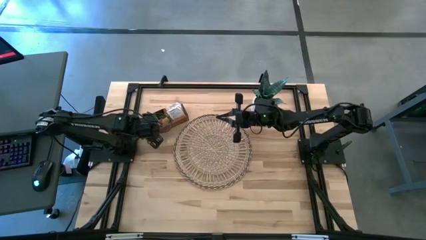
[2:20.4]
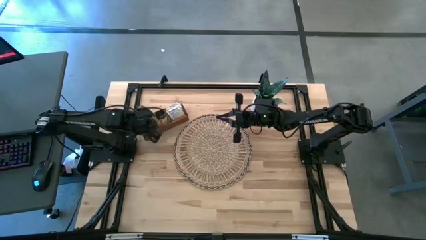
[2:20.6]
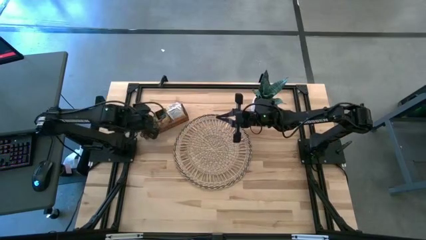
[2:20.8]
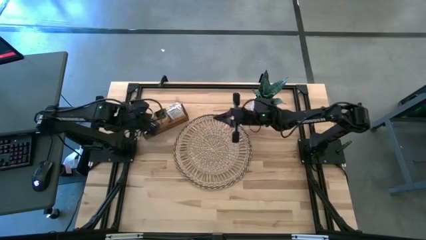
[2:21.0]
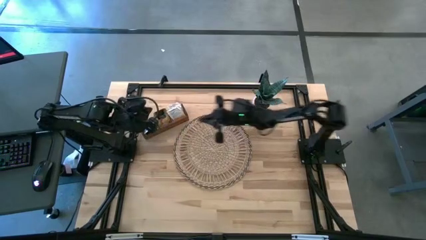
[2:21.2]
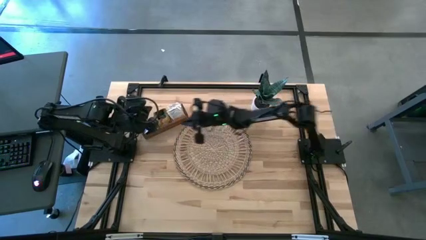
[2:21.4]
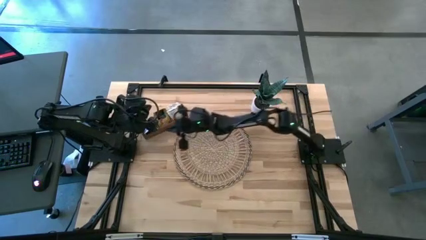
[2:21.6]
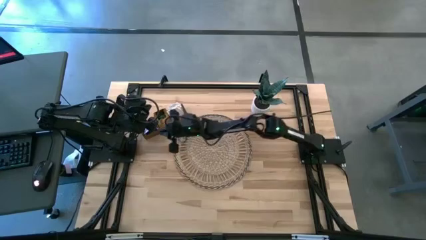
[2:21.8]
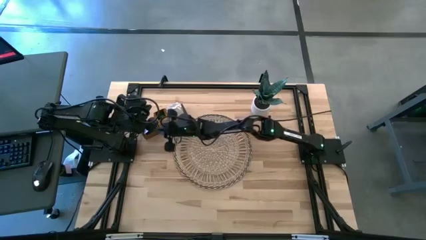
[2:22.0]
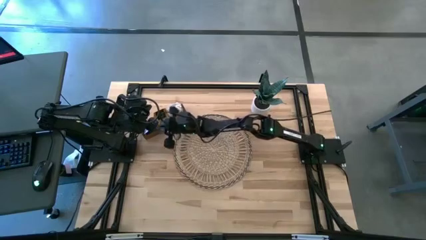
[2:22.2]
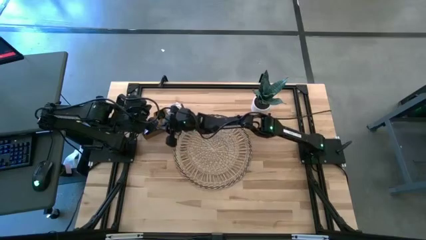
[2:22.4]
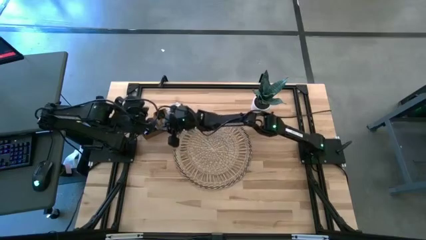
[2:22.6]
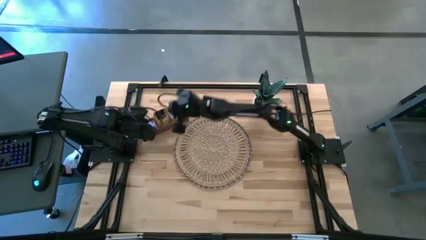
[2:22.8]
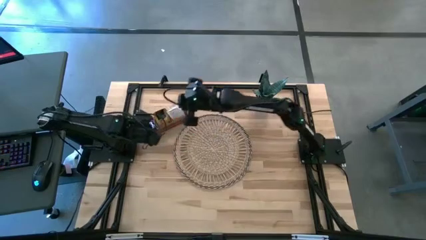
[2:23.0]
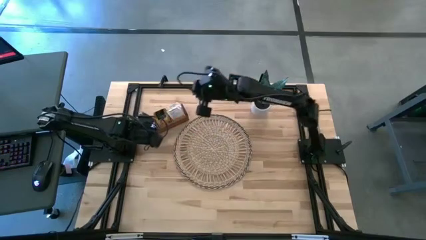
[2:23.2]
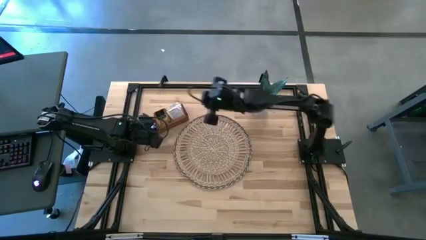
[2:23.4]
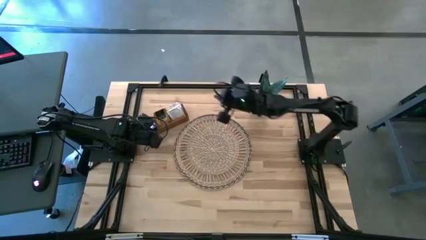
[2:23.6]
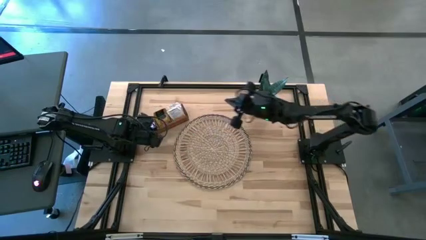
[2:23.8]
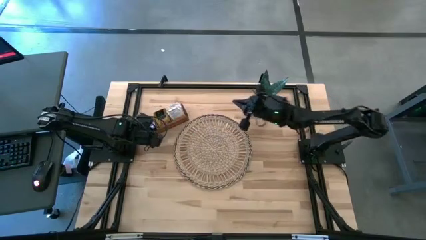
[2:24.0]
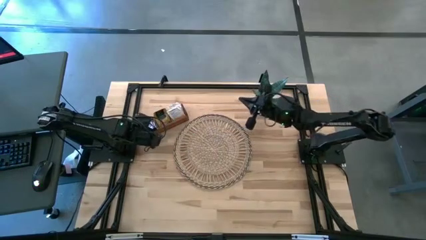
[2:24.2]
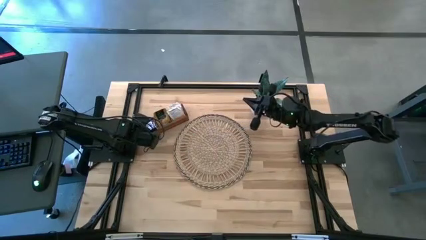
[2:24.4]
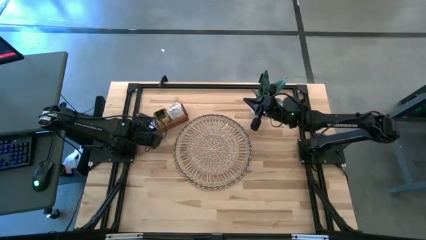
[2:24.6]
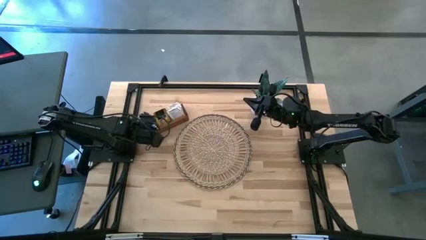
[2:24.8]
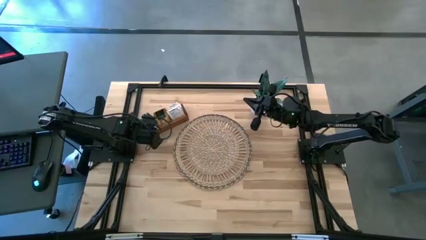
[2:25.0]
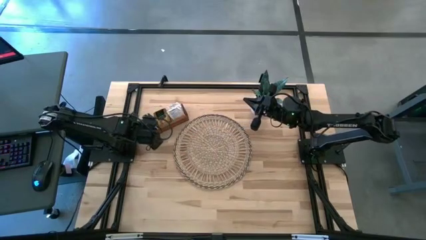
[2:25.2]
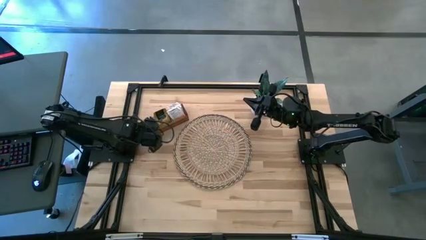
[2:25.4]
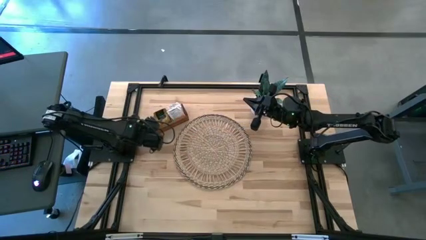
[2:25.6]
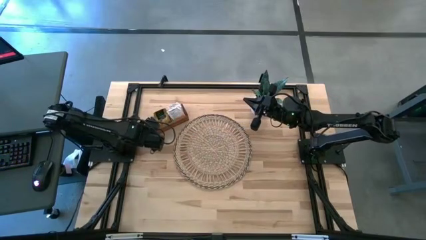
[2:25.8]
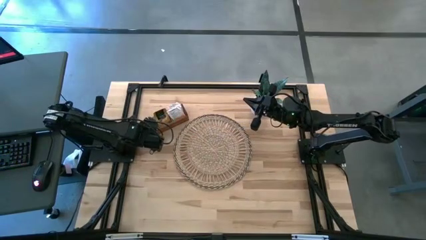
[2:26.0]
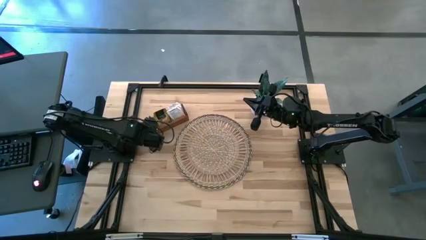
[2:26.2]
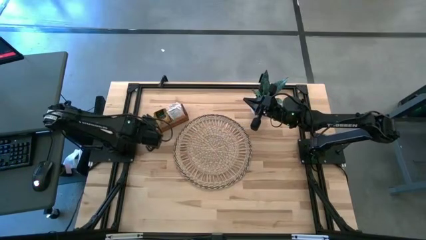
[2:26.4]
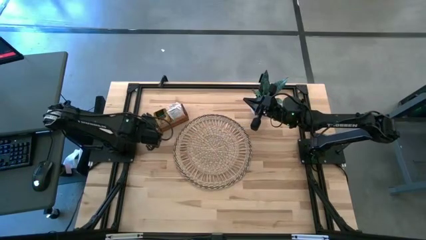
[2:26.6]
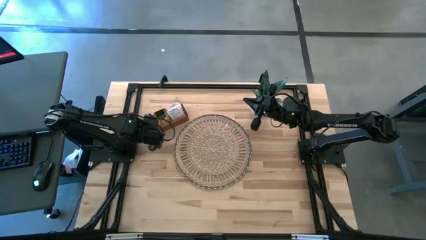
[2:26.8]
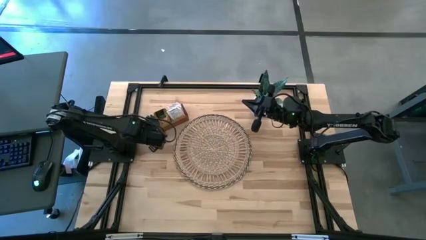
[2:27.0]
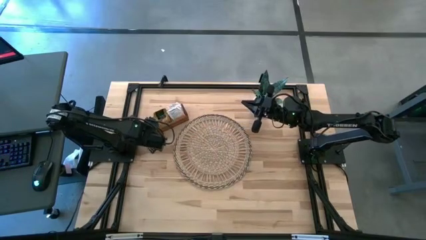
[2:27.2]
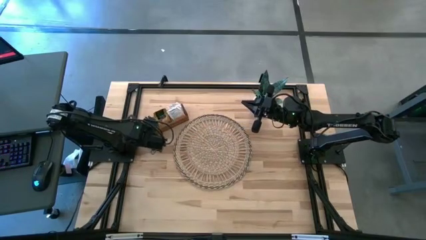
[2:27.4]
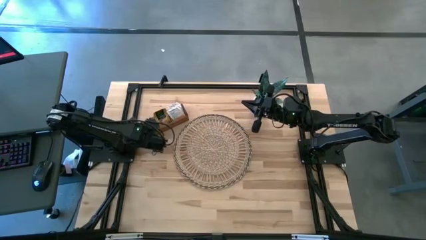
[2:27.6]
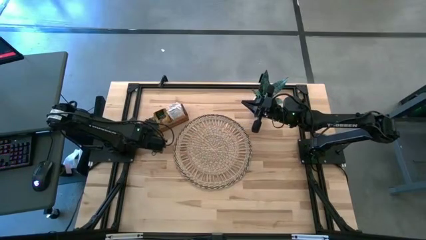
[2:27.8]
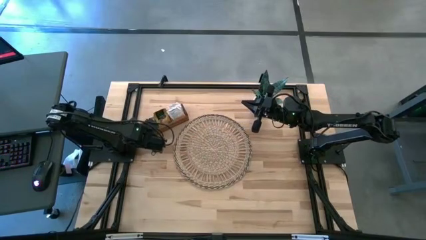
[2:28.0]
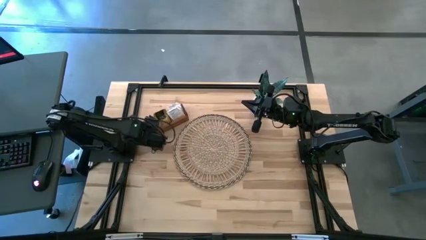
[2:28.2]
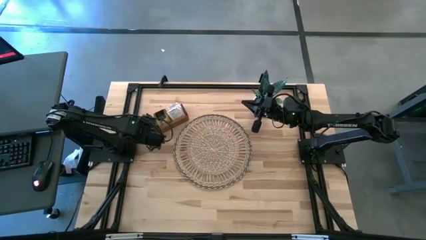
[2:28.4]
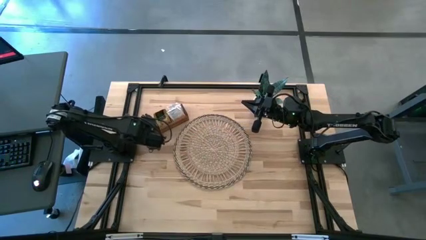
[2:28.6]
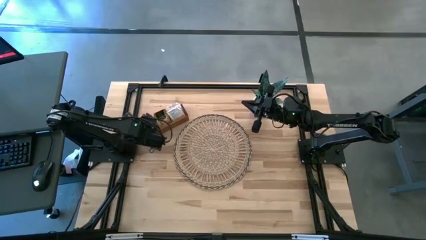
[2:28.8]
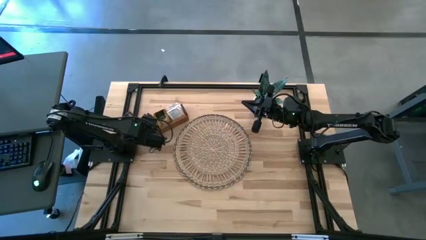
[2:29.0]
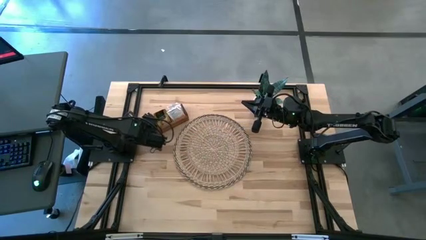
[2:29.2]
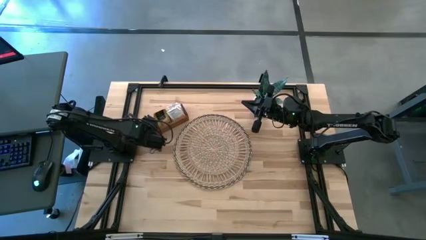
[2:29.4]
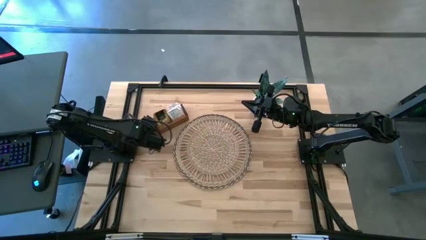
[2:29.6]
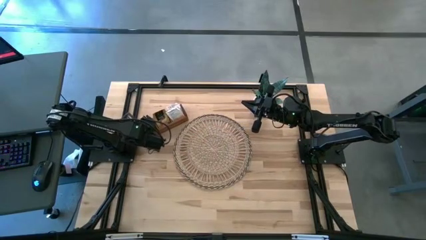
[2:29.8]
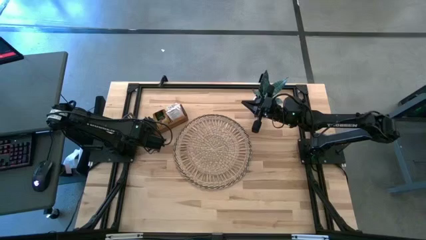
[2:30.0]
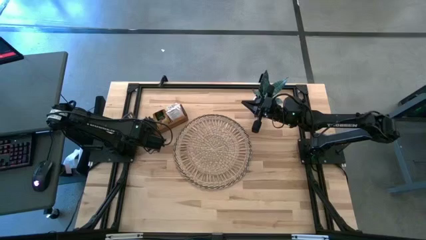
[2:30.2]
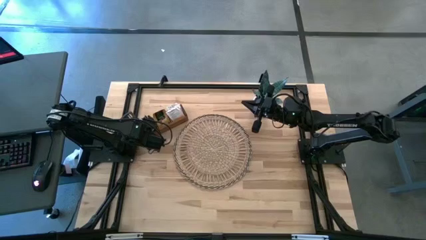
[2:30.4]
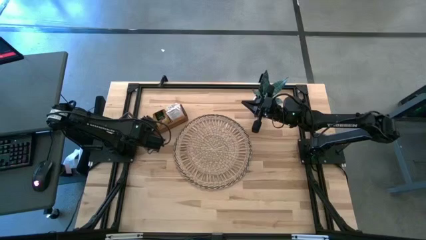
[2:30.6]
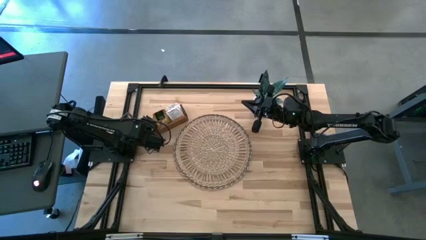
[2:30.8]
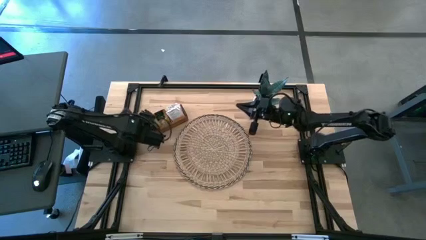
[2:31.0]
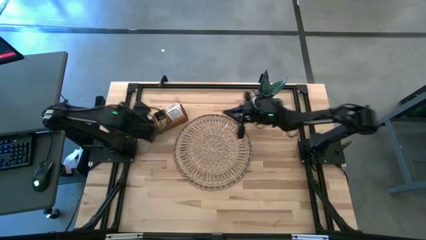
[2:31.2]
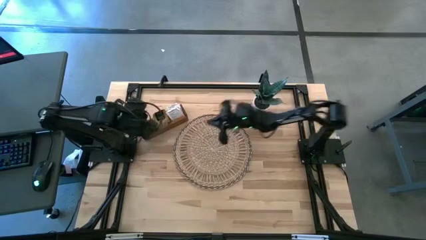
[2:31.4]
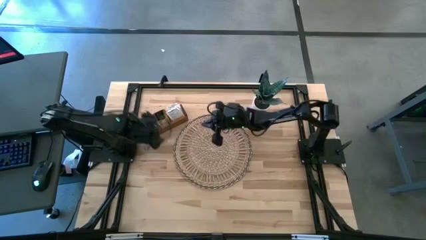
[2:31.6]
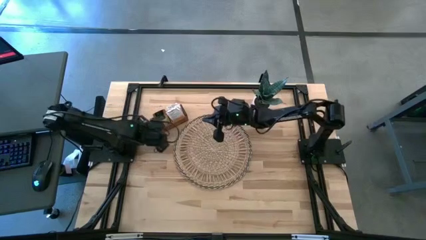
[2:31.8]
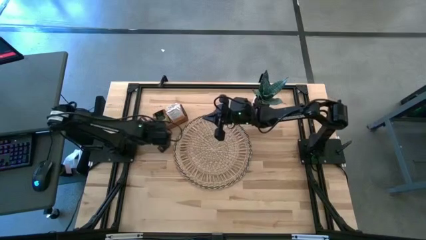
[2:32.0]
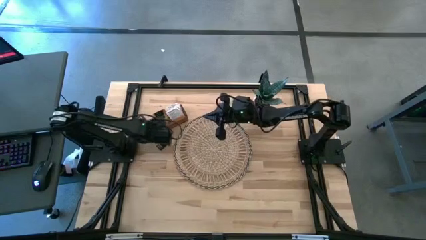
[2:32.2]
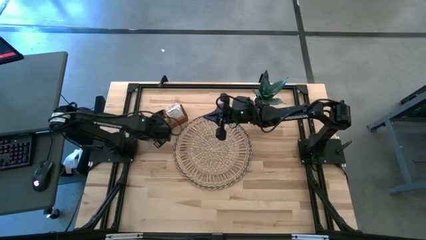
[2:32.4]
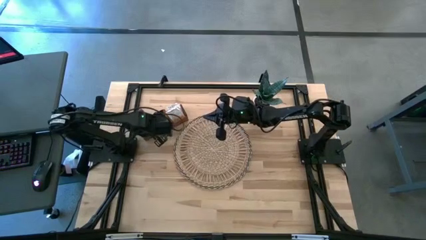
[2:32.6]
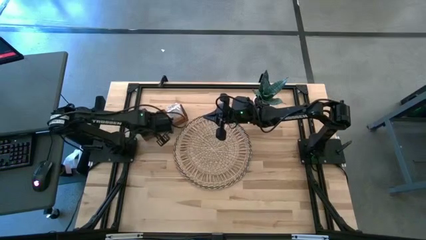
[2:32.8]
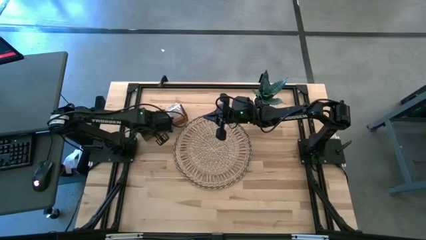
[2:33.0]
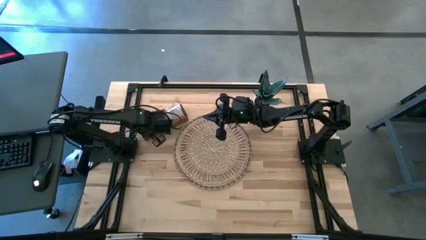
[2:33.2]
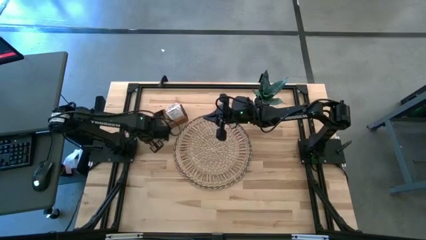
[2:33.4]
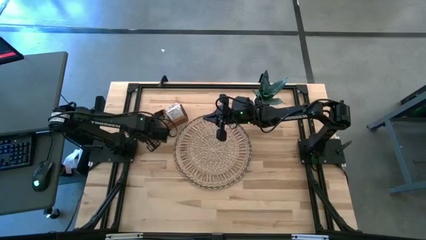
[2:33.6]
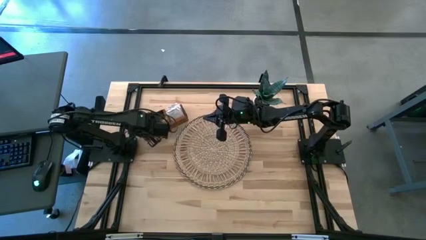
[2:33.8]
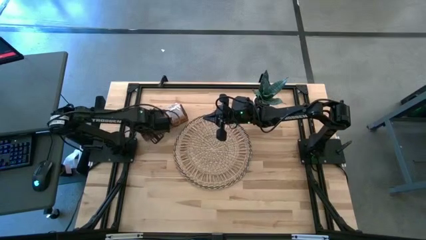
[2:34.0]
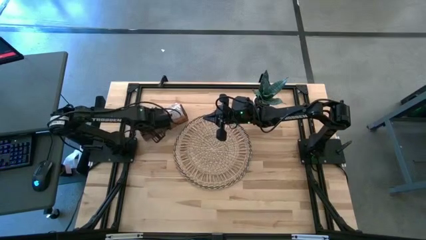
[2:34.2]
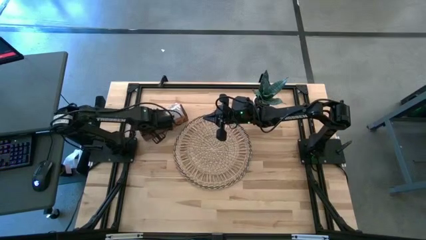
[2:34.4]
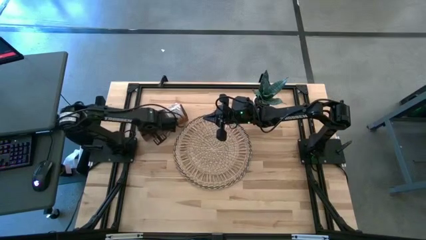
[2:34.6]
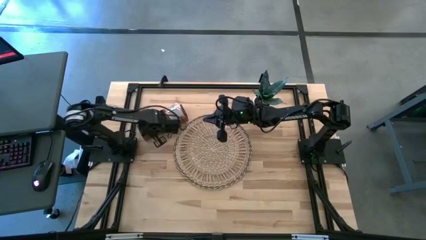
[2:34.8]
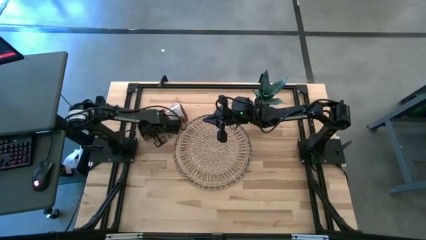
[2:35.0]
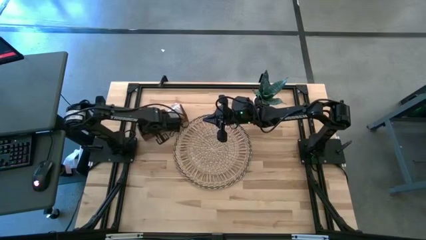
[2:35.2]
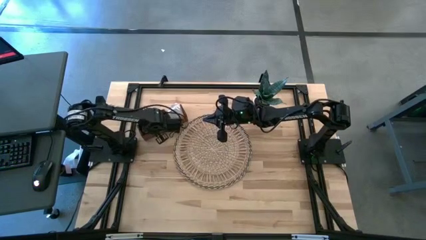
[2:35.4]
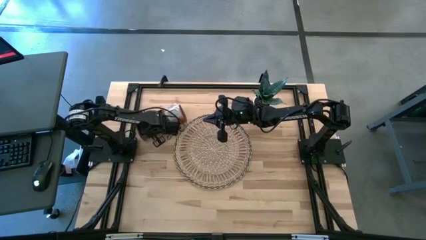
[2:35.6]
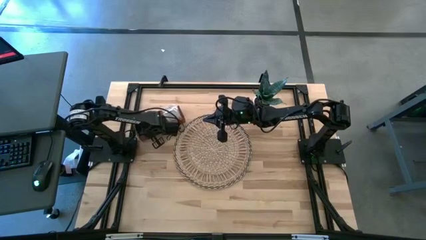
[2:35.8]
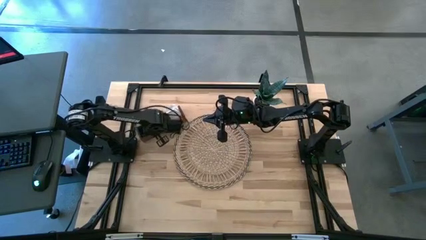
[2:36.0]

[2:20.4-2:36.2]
Task: Pick & Place Tea
Adjust the black tea bags in the left compartment of the wooden organizer
